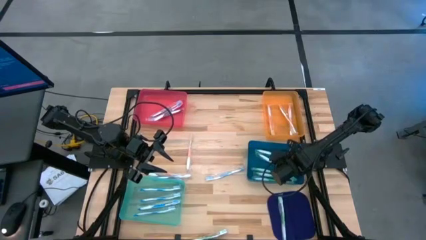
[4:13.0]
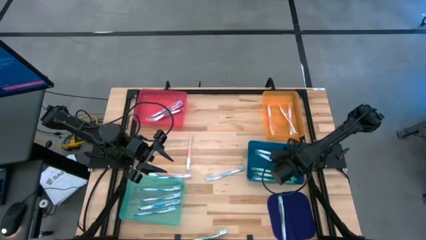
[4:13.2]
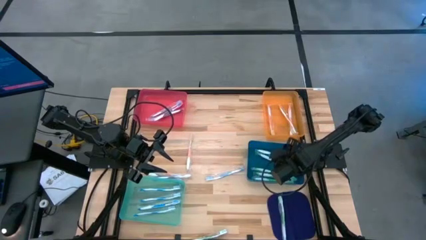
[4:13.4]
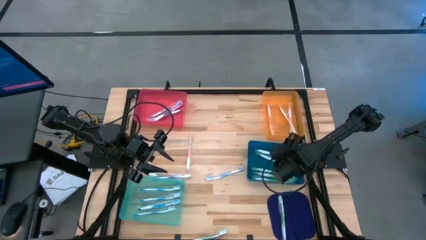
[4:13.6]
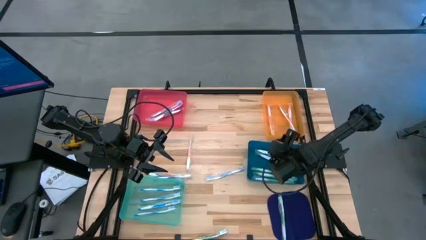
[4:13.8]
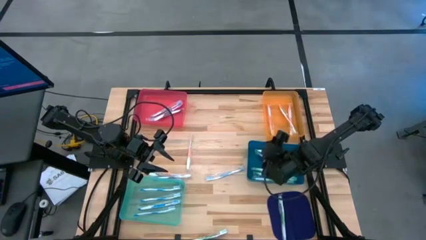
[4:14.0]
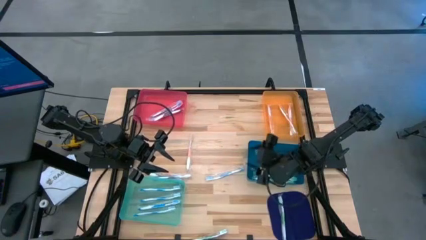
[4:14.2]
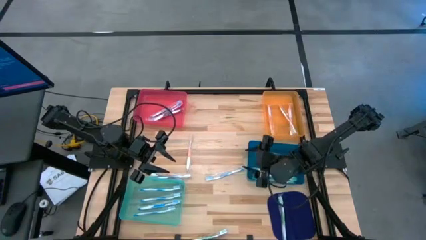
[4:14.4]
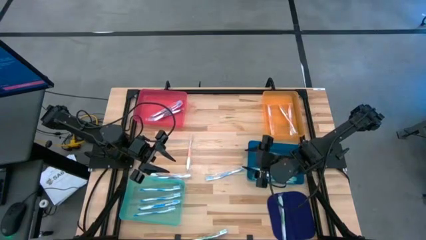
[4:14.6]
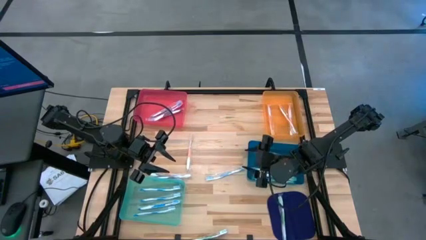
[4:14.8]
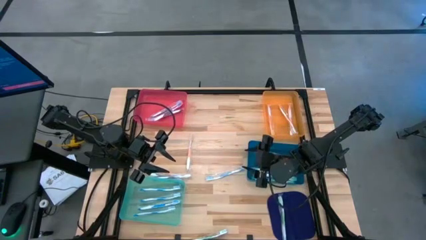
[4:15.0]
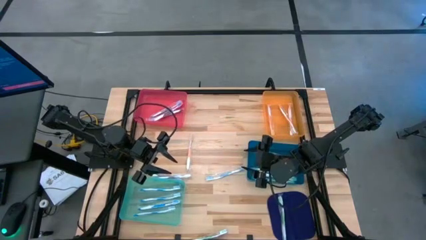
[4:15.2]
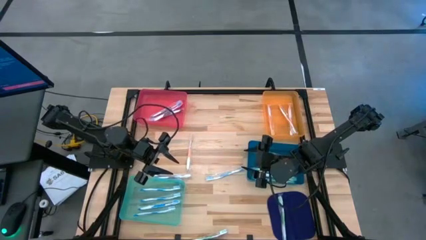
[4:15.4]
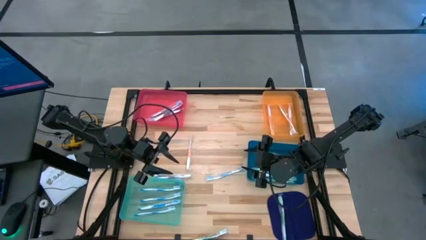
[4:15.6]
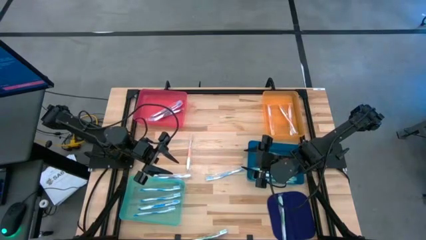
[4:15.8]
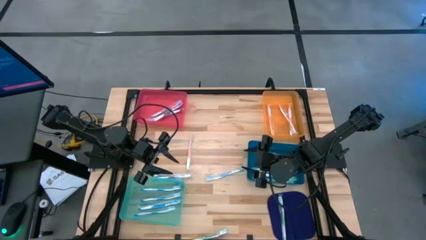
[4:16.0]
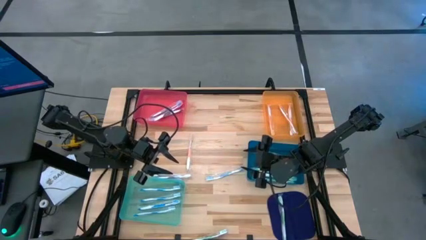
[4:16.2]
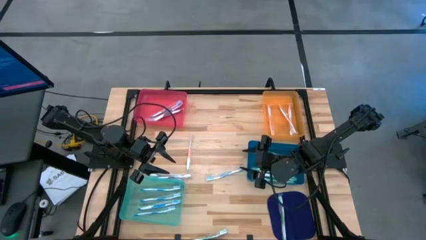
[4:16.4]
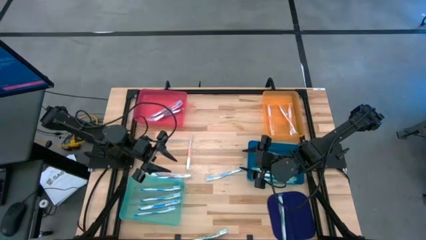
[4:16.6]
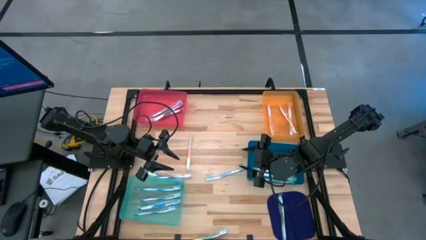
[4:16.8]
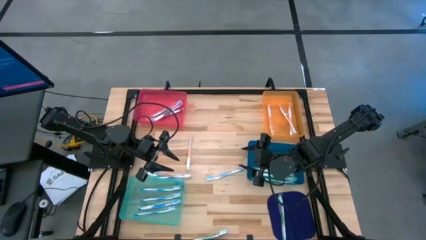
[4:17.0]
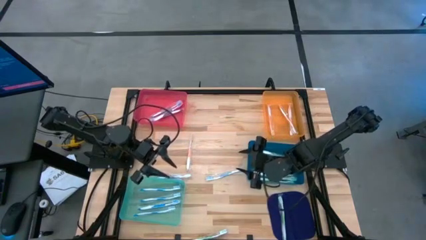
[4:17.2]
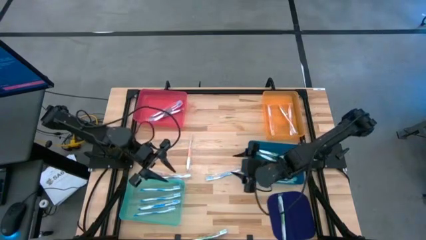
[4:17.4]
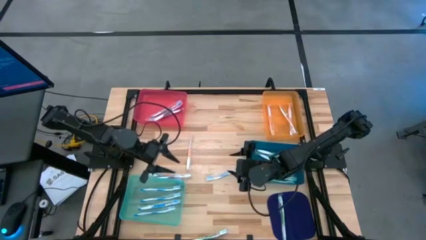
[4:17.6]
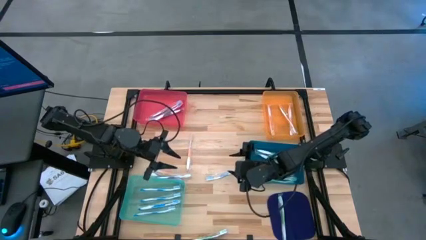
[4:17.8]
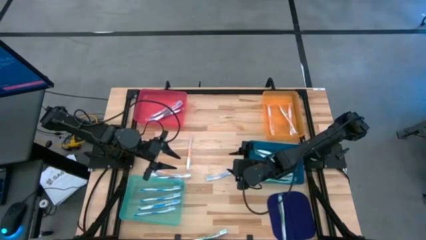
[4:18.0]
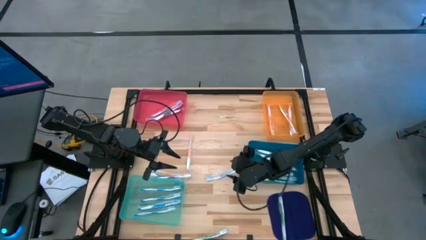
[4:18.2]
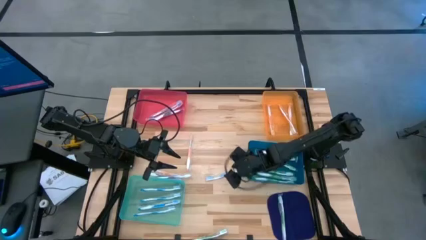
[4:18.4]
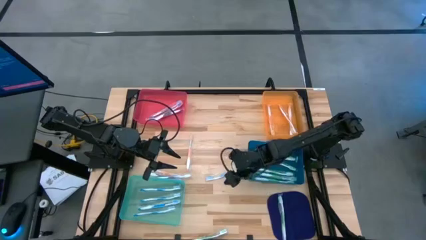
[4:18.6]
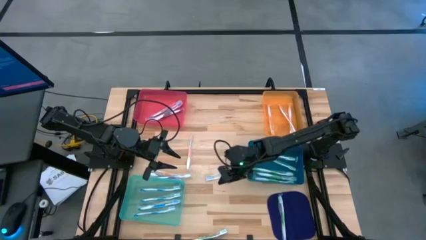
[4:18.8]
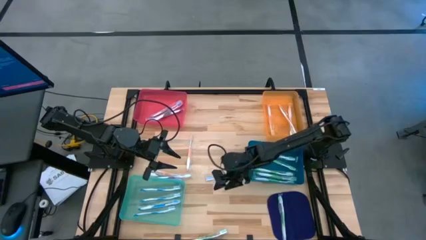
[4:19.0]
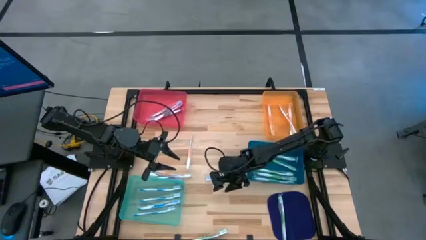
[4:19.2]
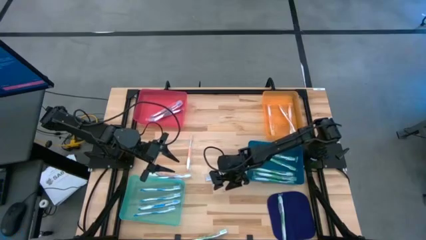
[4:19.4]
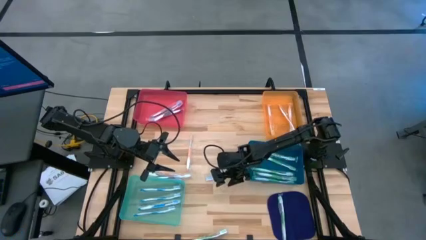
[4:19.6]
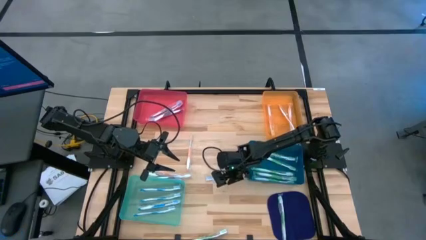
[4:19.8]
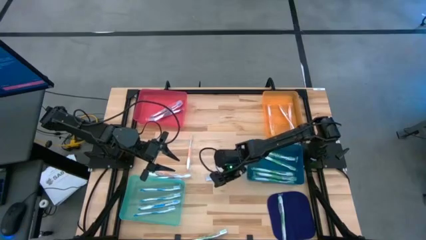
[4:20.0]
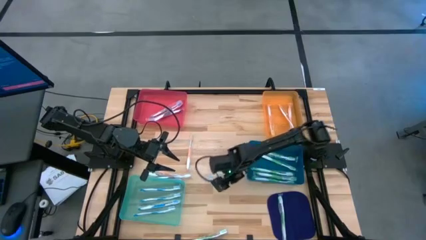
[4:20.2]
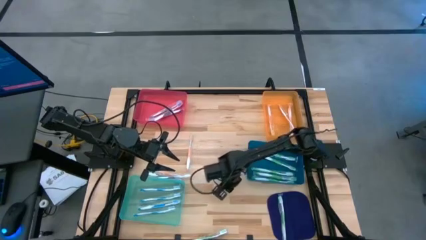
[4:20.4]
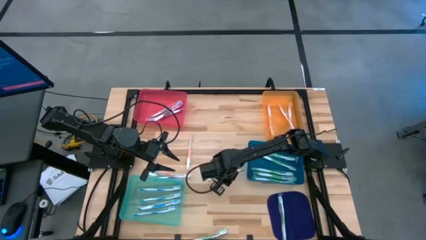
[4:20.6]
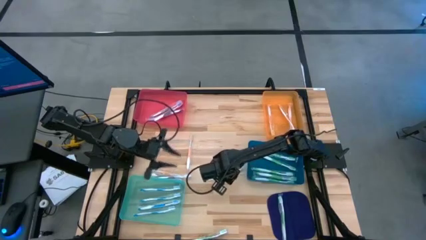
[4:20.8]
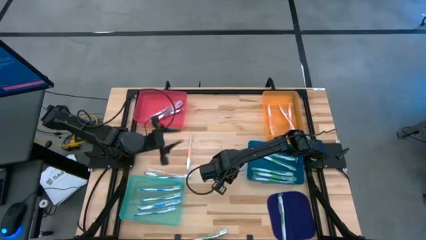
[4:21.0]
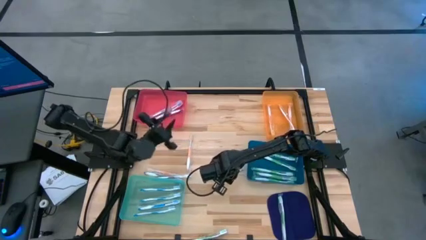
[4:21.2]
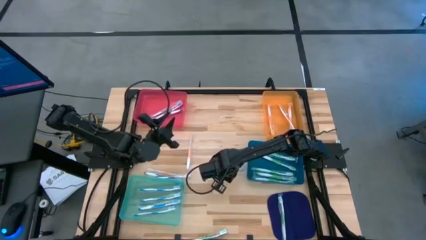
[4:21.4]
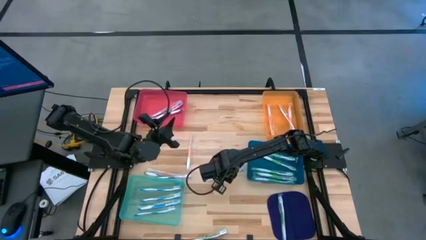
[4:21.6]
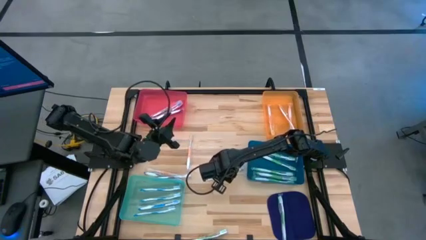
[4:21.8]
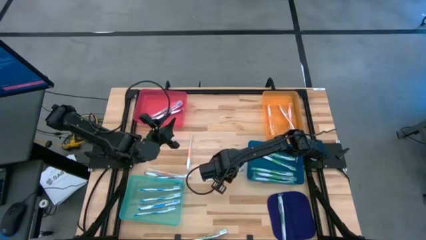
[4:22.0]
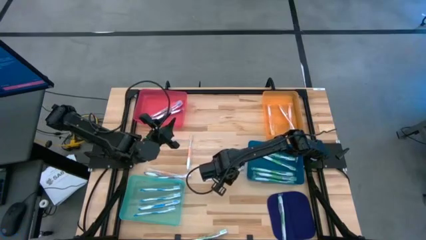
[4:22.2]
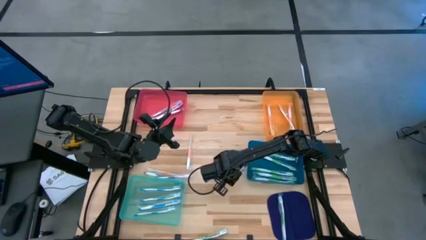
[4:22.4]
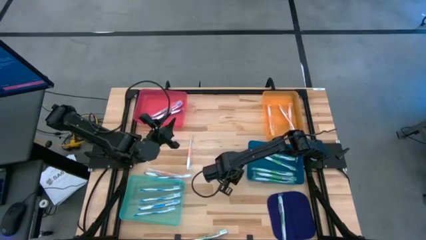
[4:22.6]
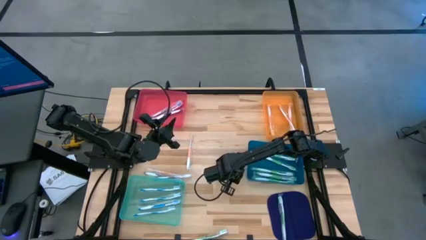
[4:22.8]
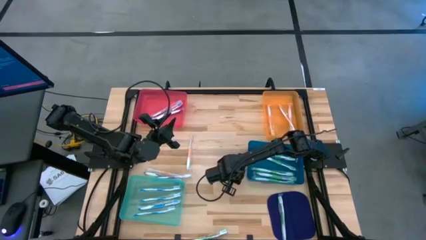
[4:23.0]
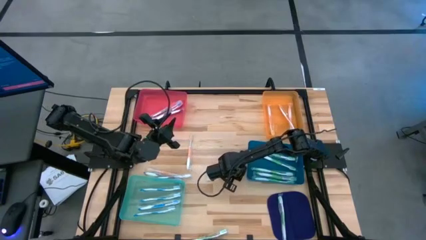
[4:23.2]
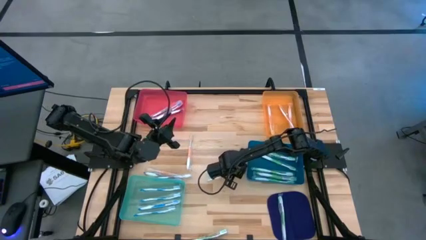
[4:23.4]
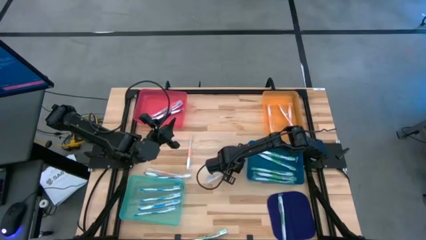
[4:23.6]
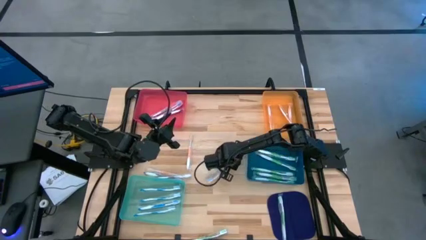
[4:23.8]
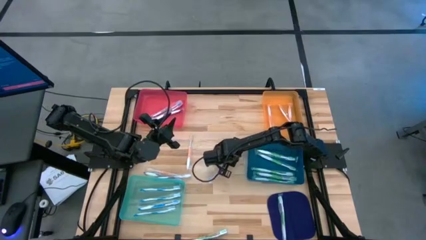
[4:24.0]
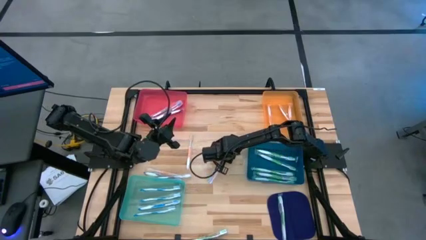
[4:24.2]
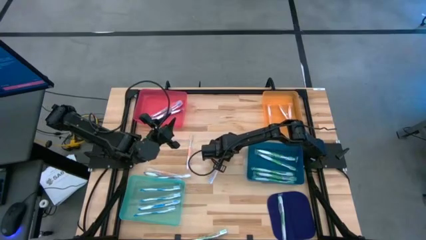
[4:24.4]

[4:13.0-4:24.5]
Task: Pick & Place Toothbrushes
Put the blue toothbrush into the green bin
